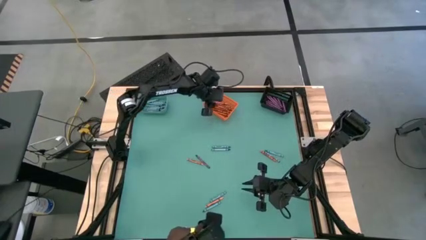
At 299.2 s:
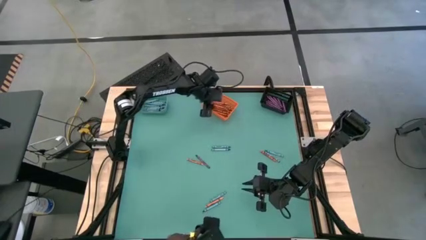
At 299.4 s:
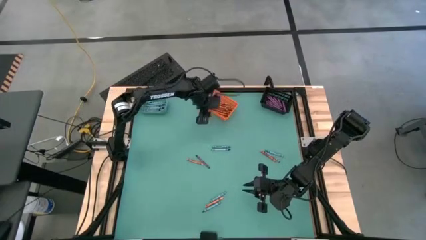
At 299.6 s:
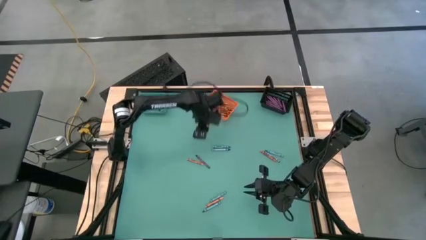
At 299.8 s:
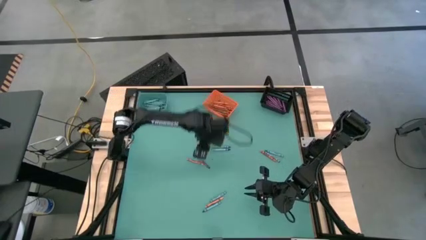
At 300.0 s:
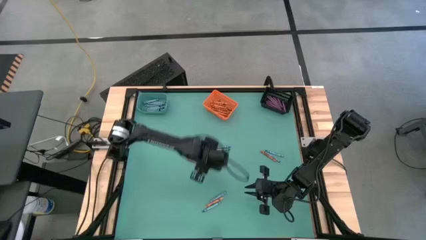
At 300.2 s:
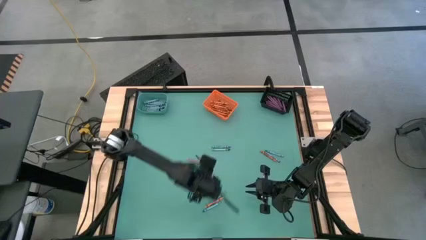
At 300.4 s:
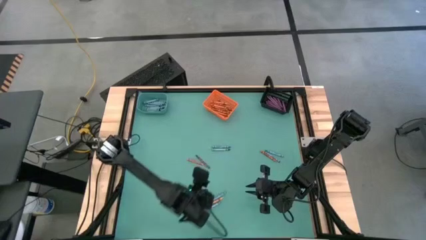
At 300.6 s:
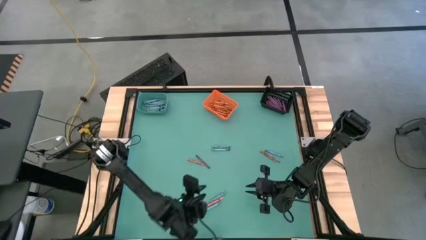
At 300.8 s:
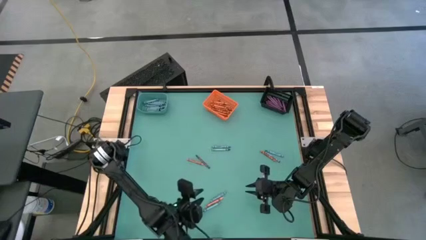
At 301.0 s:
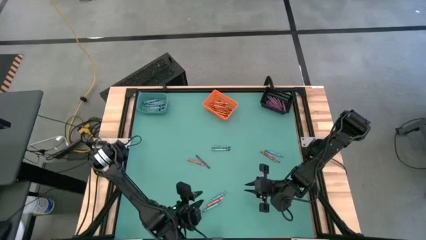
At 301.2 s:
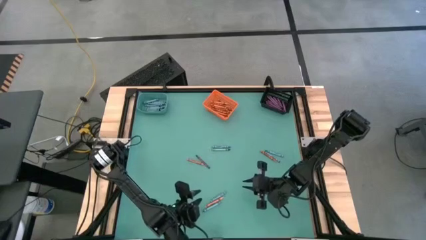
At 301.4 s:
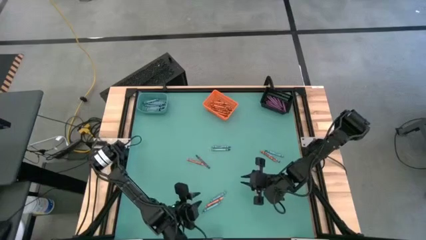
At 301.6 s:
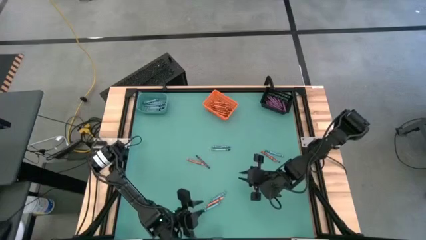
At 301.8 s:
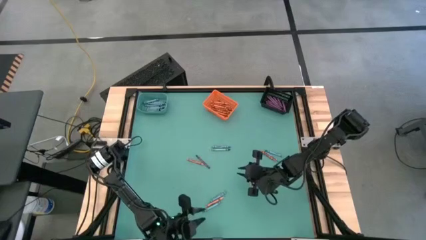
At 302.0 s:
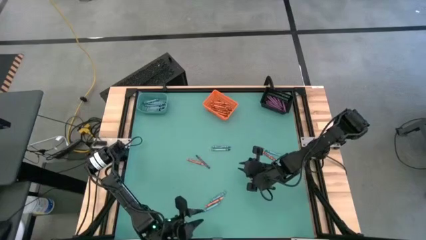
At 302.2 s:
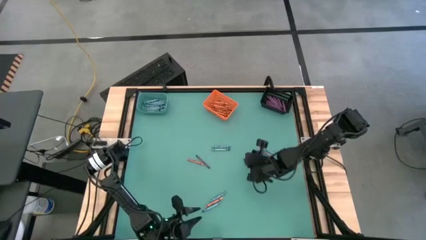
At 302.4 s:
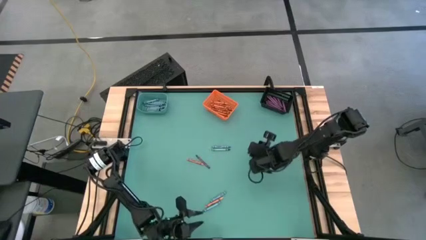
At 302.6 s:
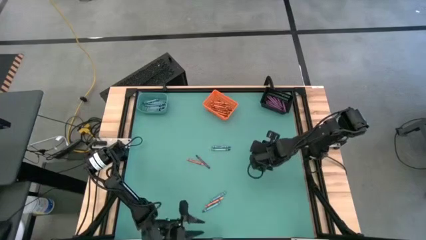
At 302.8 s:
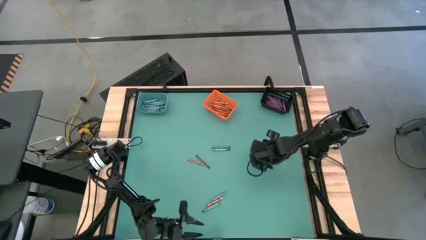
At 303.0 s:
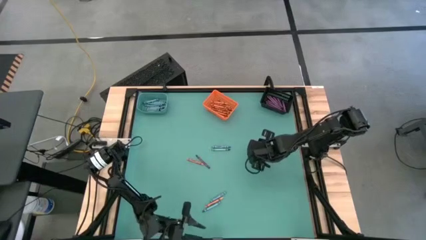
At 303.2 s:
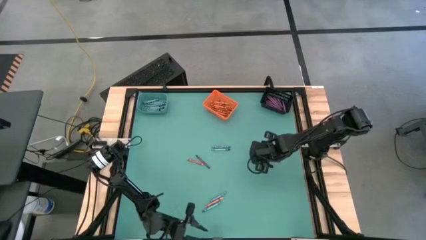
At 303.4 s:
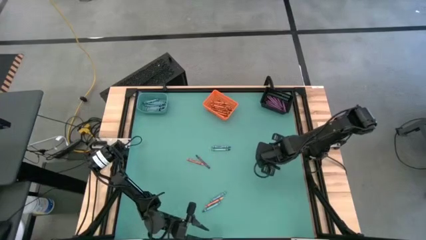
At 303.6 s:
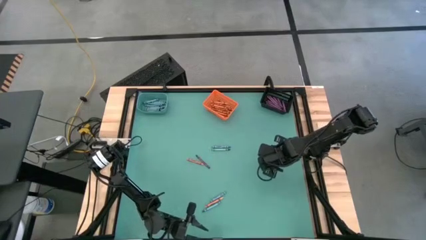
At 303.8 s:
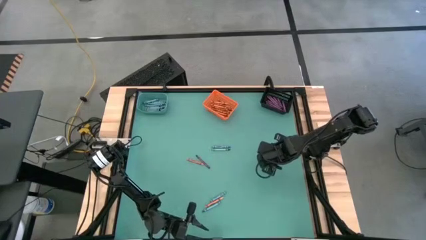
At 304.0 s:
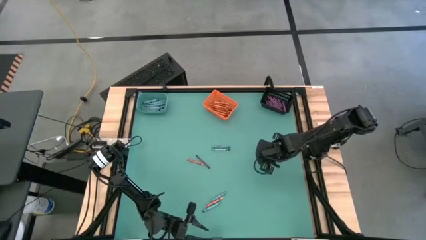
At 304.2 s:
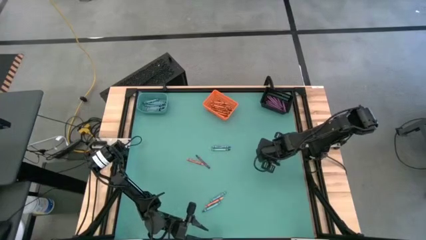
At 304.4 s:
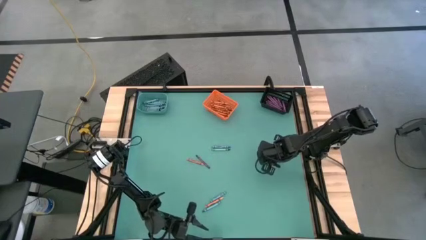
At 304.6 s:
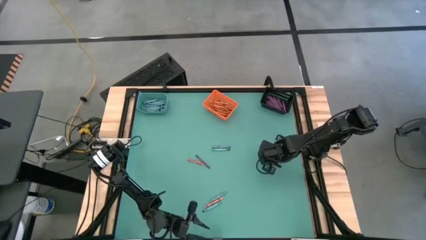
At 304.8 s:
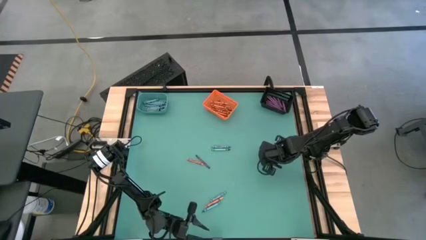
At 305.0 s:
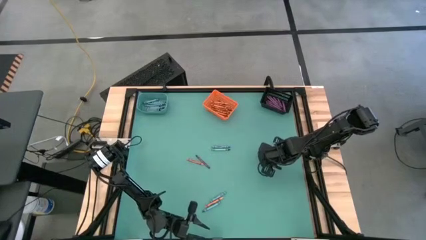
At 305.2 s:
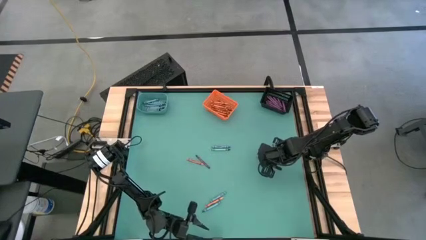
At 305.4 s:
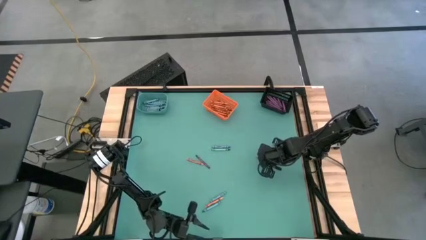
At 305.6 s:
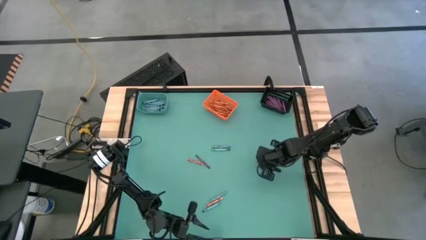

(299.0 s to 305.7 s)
Task: Sort crayons
Put the orange crayon in the orange bin

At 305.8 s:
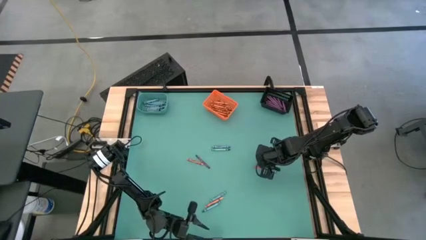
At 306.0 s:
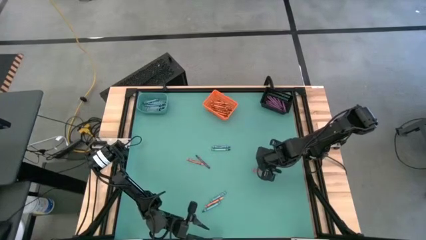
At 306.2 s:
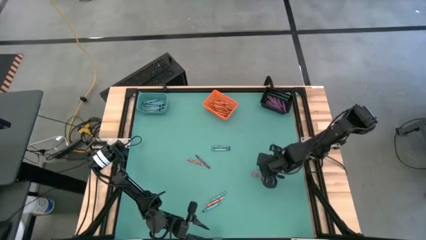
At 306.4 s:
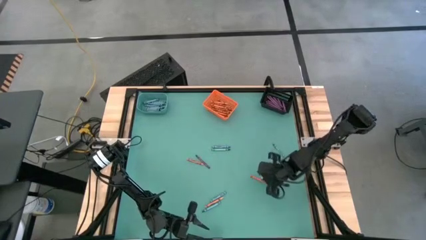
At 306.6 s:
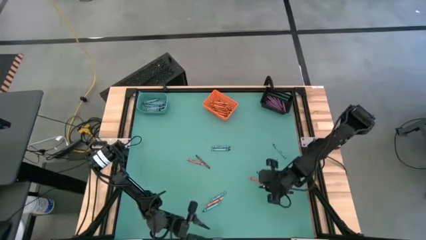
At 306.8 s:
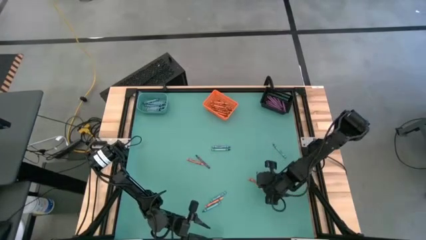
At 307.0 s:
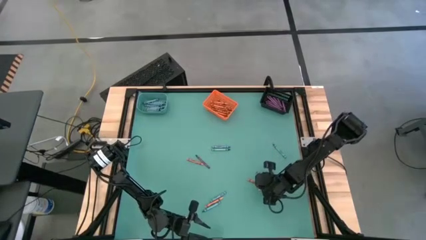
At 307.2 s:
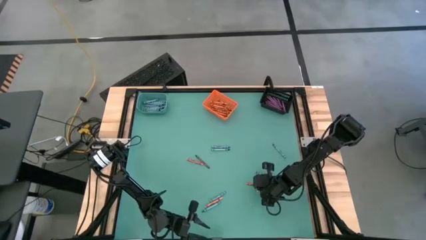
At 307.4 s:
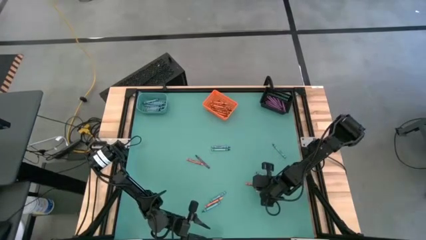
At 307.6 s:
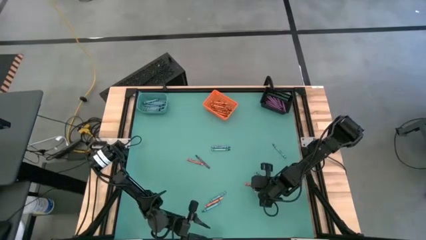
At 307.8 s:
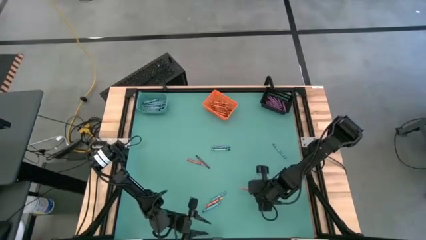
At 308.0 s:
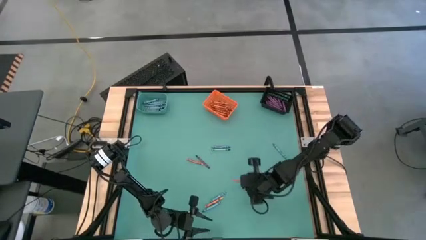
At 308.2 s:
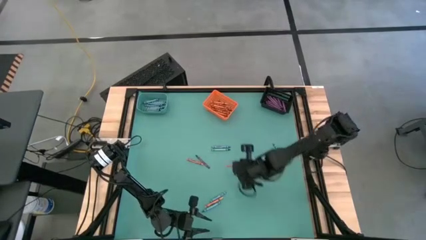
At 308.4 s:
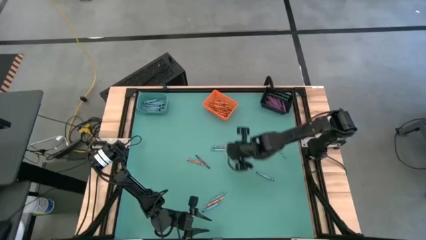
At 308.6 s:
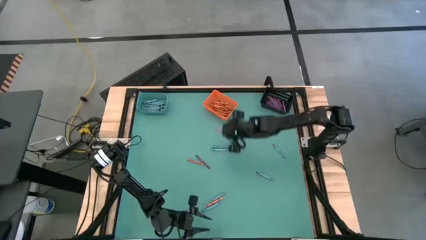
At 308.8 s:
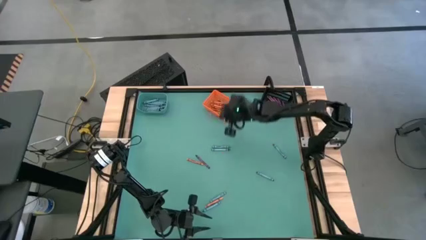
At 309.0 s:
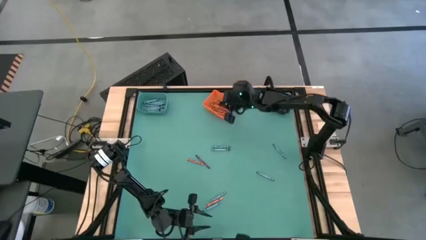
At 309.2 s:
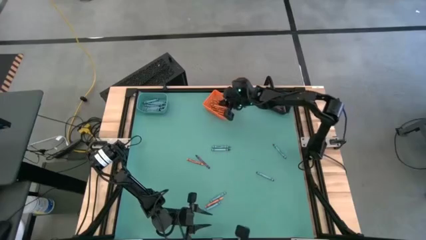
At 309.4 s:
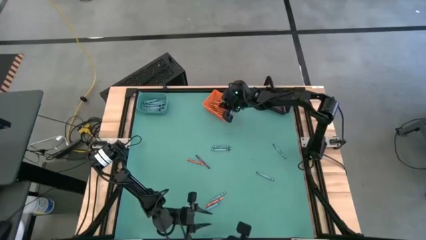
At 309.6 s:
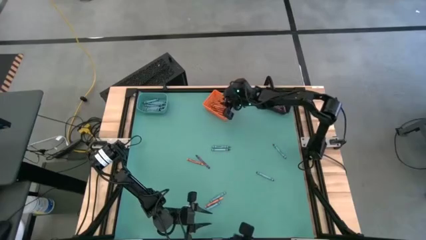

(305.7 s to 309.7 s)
Put the orange crayon into the orange bin

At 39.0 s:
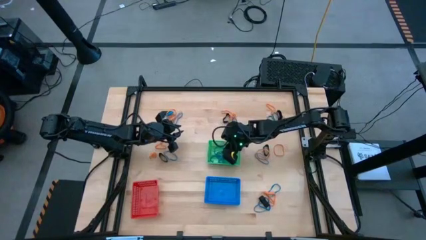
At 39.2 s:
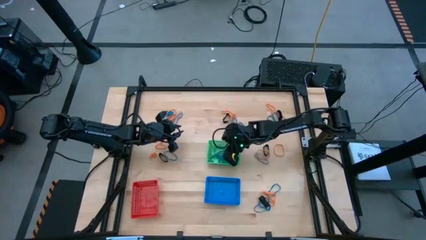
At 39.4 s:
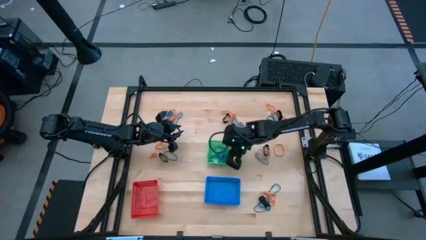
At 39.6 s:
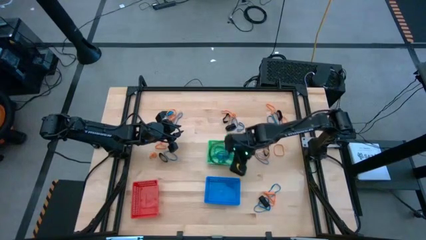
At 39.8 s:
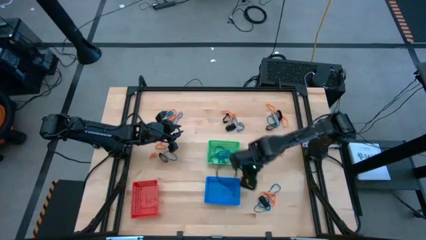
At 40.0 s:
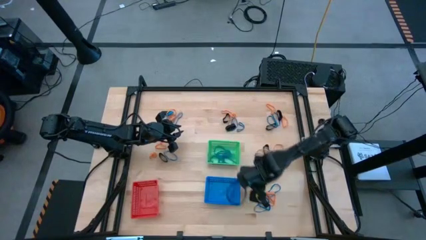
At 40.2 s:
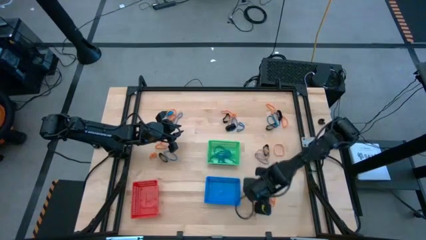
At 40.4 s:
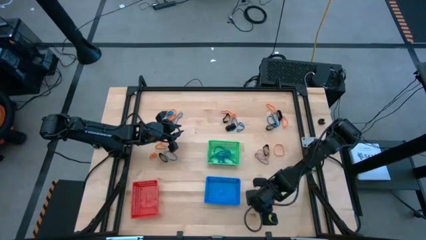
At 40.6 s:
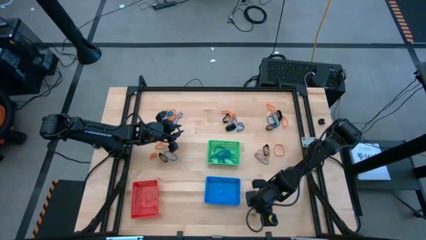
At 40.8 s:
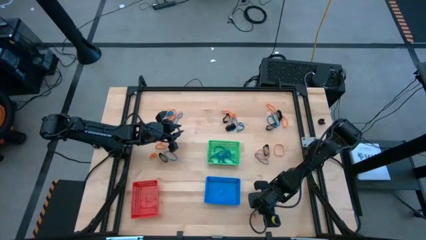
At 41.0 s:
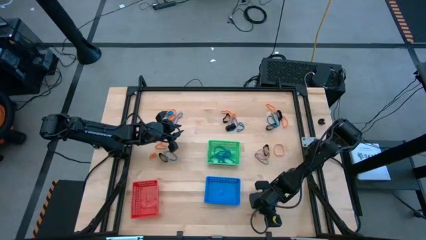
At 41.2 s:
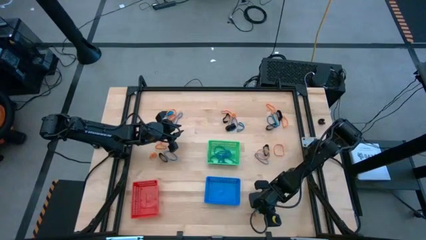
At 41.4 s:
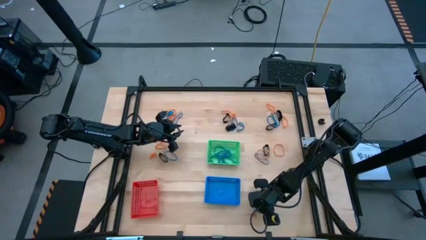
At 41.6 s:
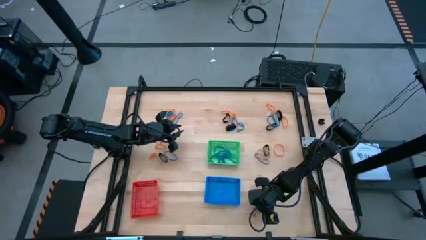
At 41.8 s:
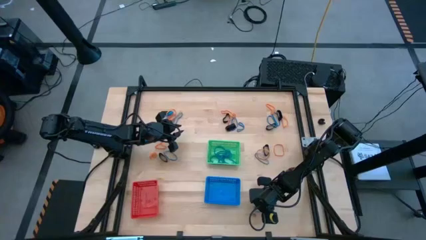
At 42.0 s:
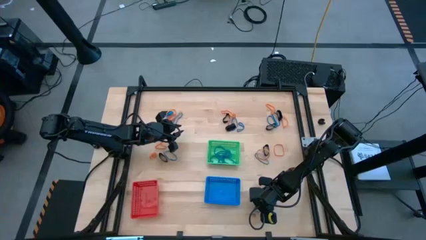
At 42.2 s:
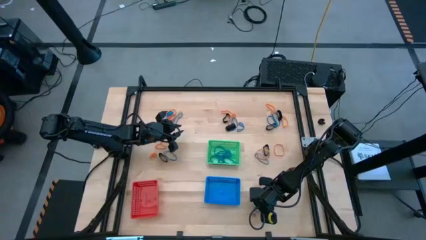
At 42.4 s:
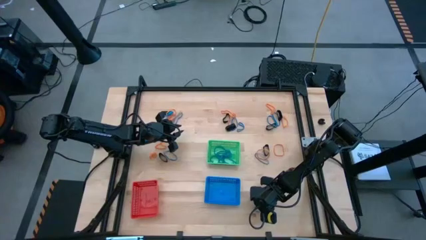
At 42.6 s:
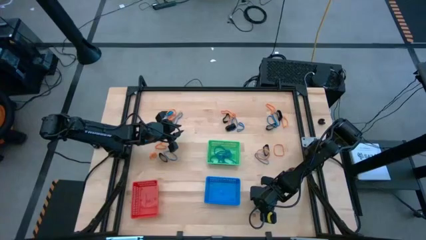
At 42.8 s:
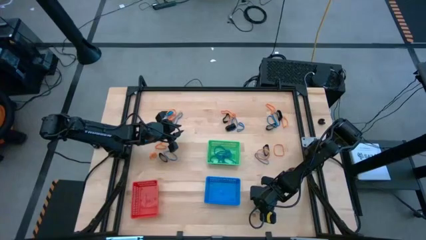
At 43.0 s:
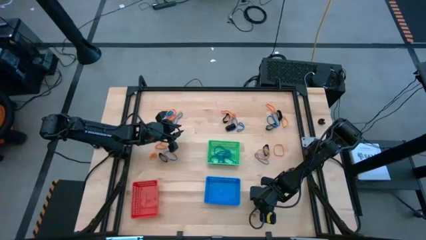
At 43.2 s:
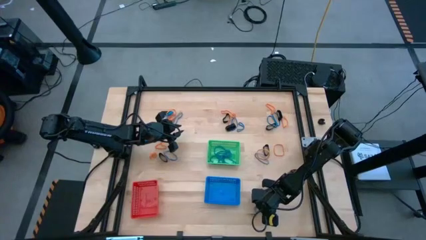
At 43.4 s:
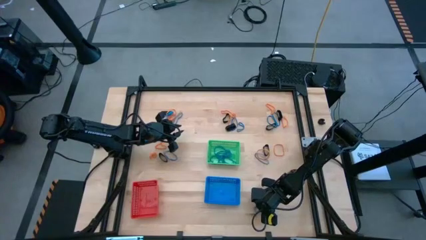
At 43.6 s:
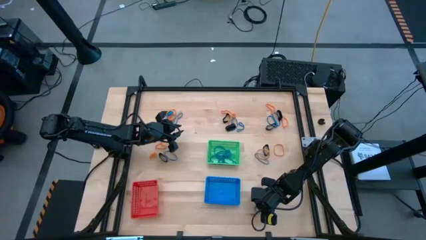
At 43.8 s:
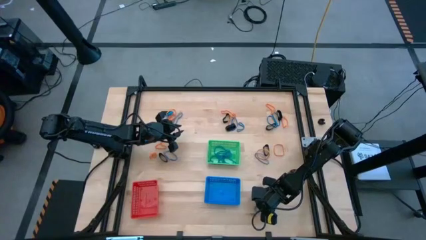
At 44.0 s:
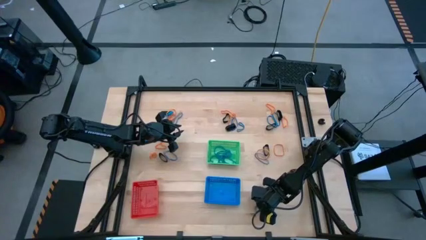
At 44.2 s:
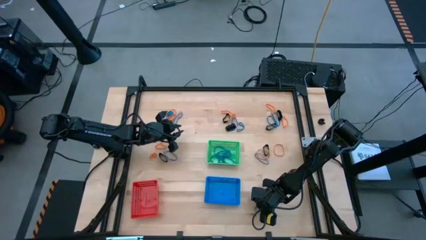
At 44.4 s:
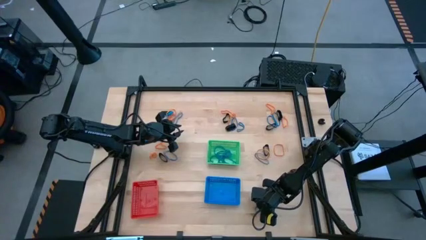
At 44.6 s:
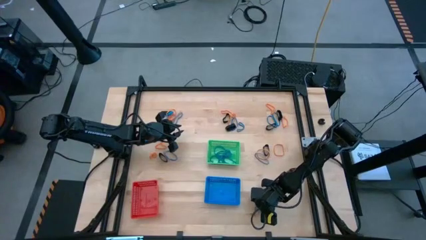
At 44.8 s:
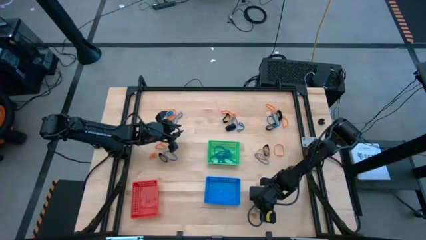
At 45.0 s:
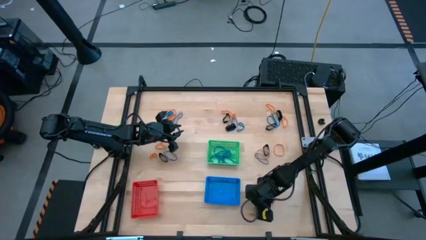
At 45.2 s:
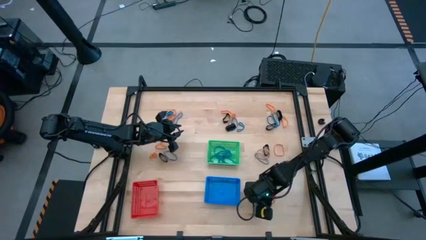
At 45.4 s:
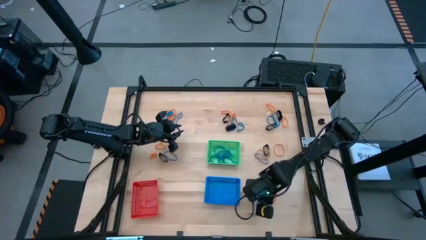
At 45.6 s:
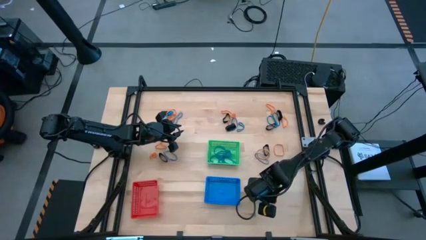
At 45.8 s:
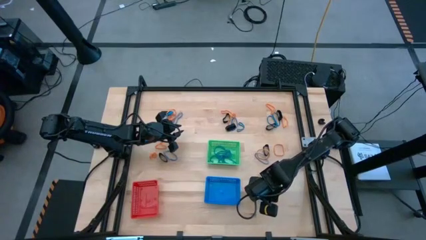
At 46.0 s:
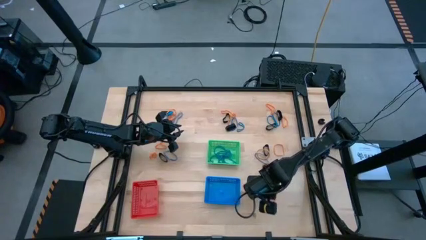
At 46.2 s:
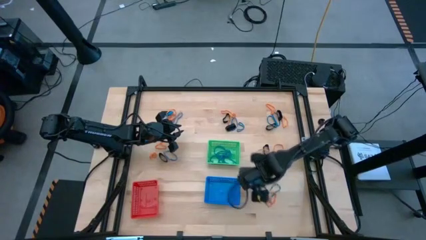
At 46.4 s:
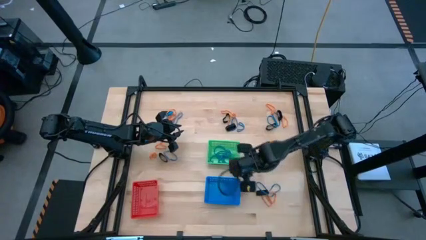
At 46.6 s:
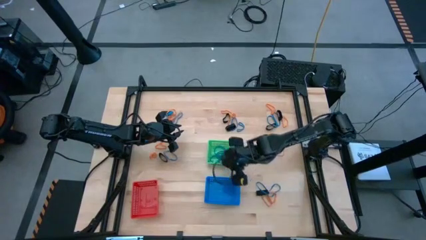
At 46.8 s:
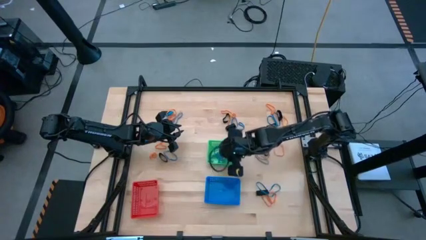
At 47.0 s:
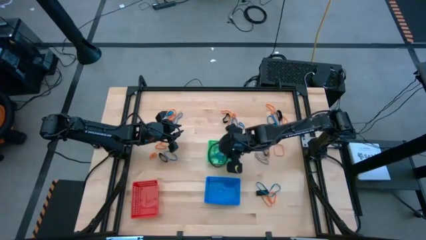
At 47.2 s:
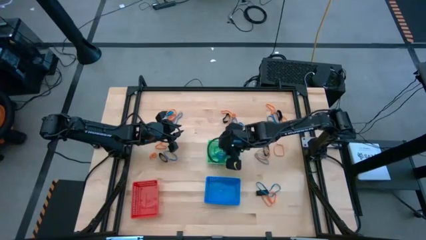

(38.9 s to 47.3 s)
Task: Sort rubber bands into baskets
Put the blue rubberband into the green bin
